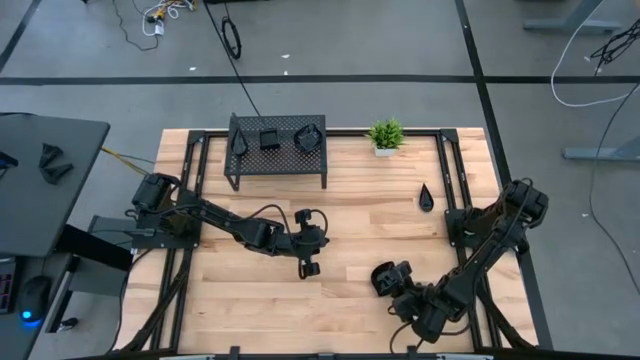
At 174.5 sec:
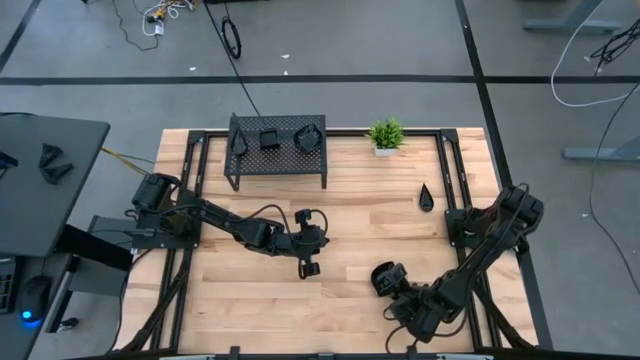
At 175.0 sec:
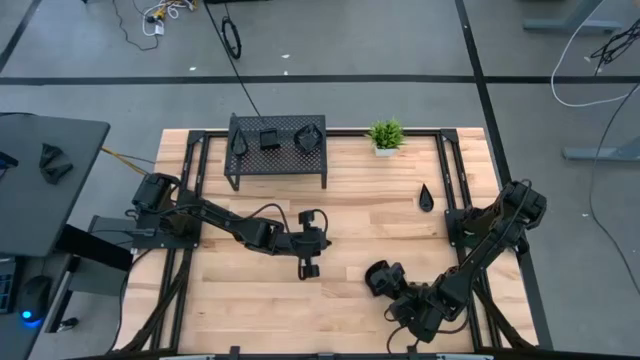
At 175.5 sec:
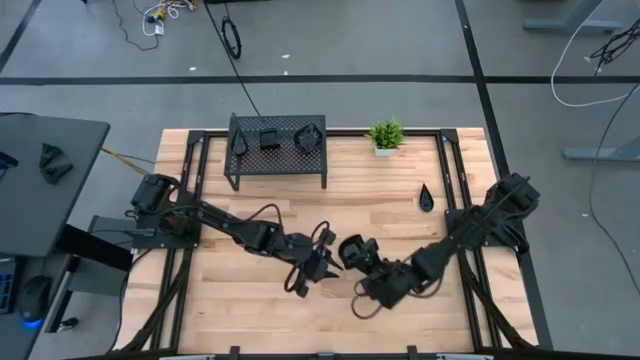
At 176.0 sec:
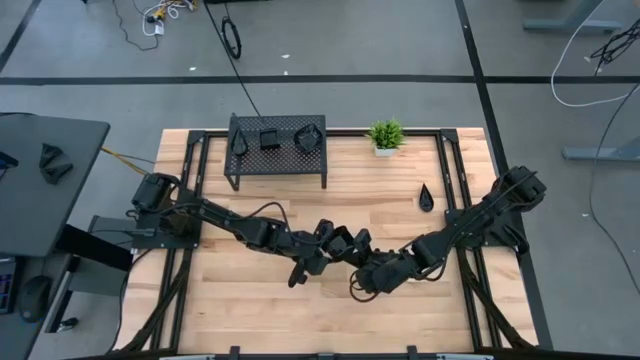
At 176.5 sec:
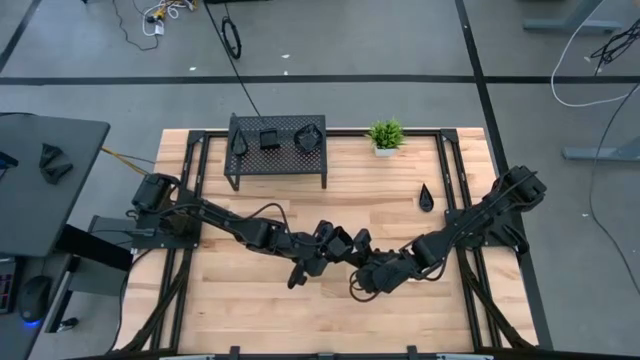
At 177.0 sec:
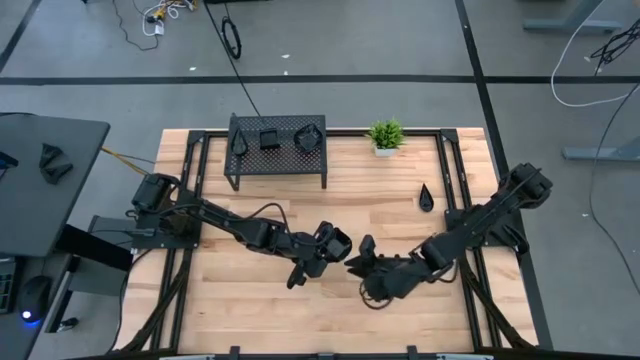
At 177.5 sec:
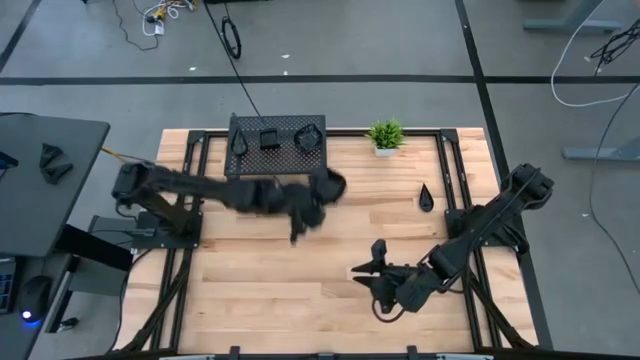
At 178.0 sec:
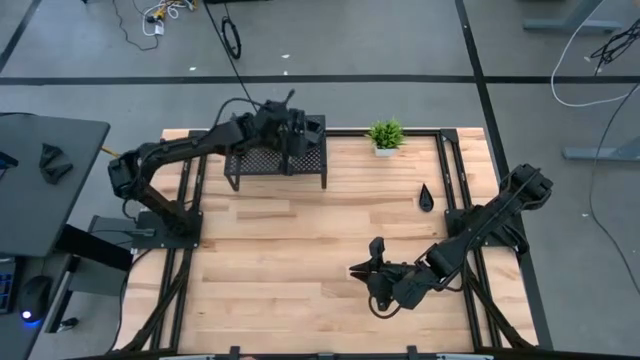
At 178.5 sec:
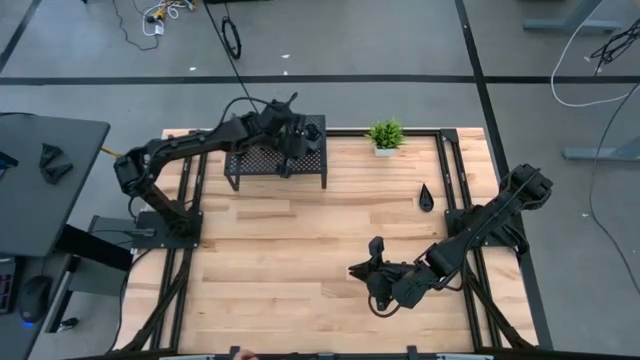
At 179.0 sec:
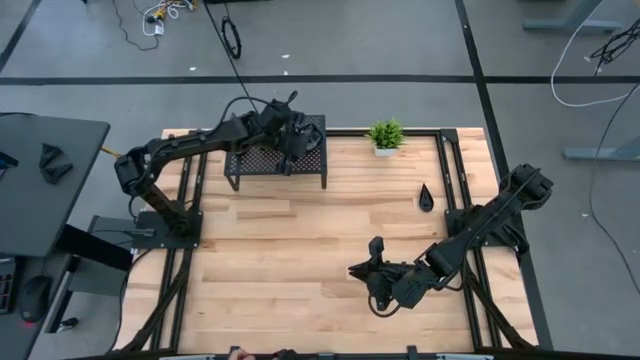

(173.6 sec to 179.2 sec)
Task: Pick & Place Mini shaped plates
Stack the black leaf shaped plate on top of the black leaf shaped plates on the shelf

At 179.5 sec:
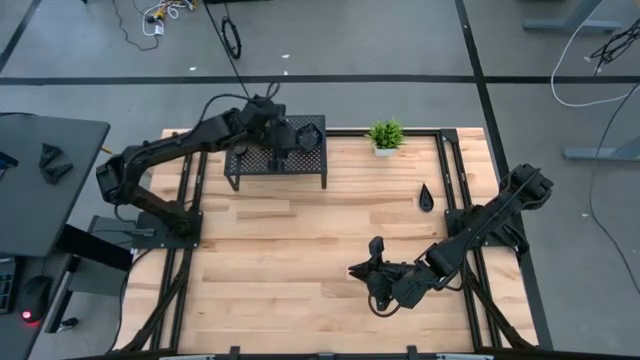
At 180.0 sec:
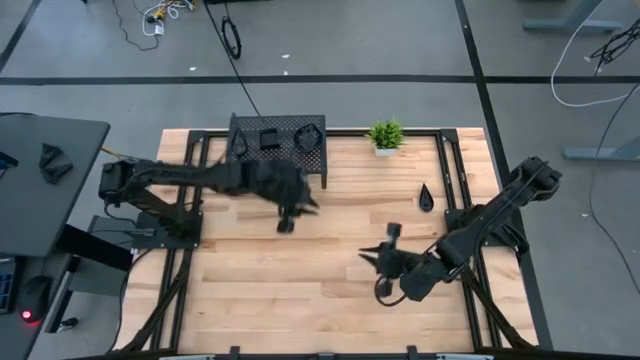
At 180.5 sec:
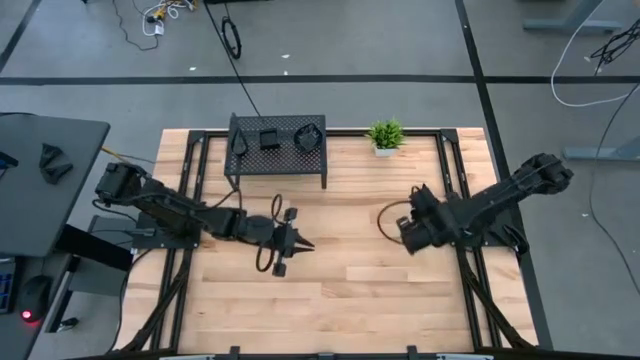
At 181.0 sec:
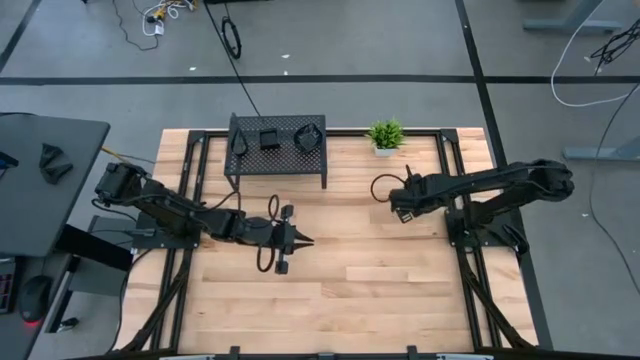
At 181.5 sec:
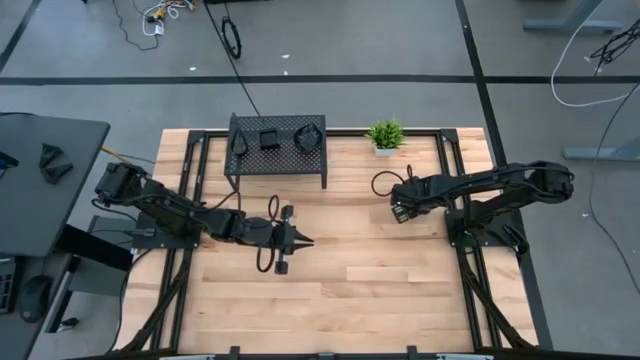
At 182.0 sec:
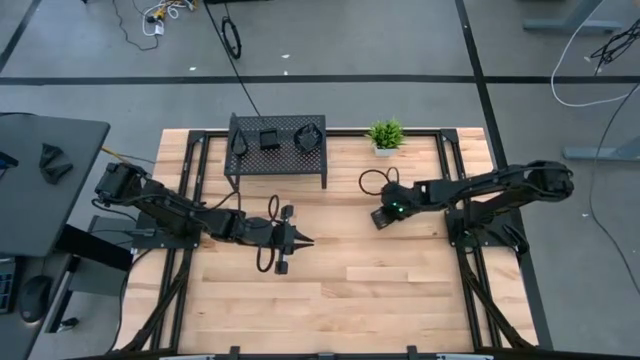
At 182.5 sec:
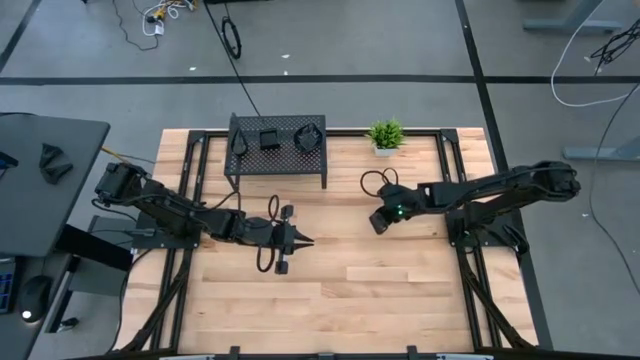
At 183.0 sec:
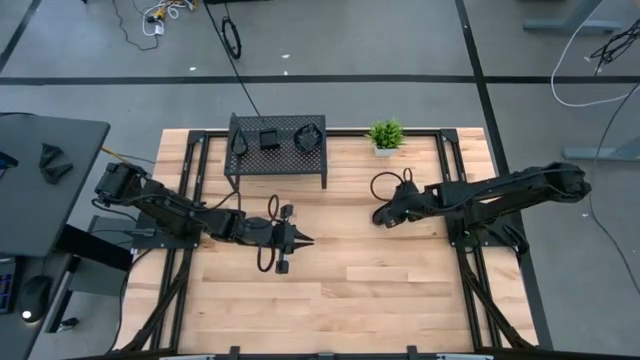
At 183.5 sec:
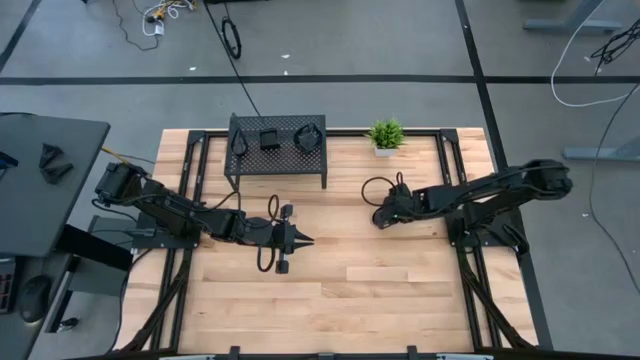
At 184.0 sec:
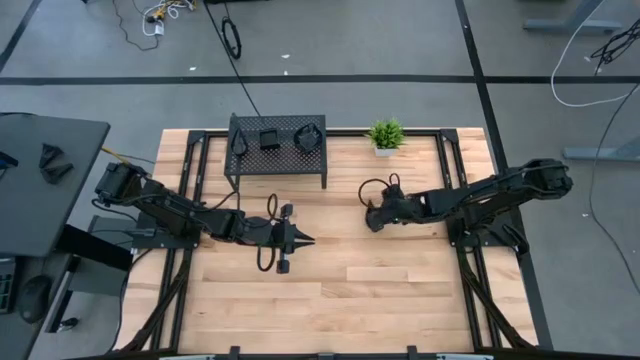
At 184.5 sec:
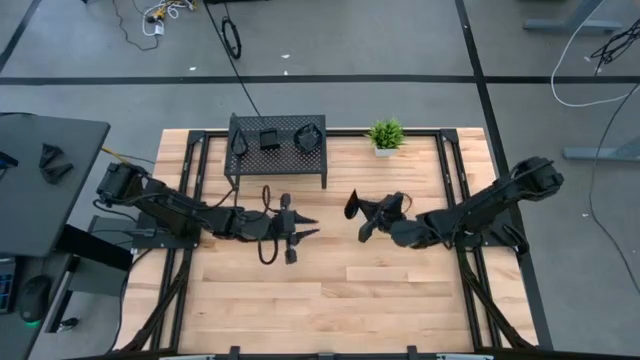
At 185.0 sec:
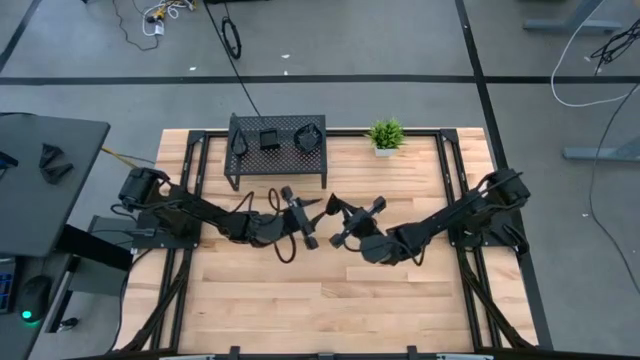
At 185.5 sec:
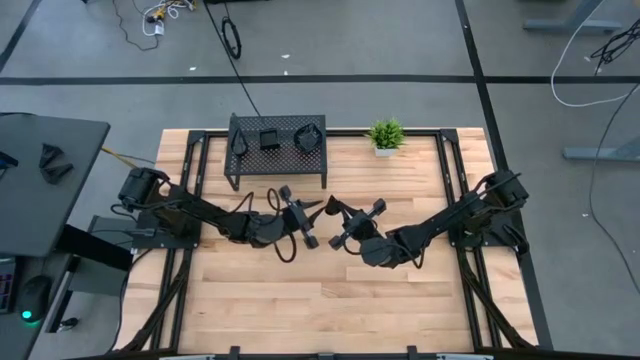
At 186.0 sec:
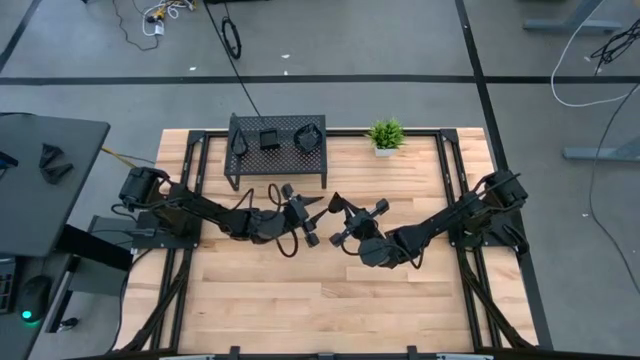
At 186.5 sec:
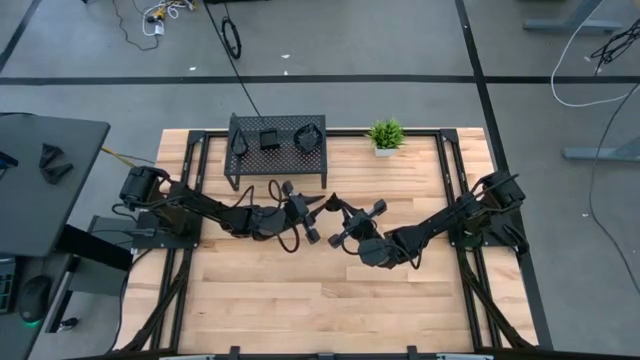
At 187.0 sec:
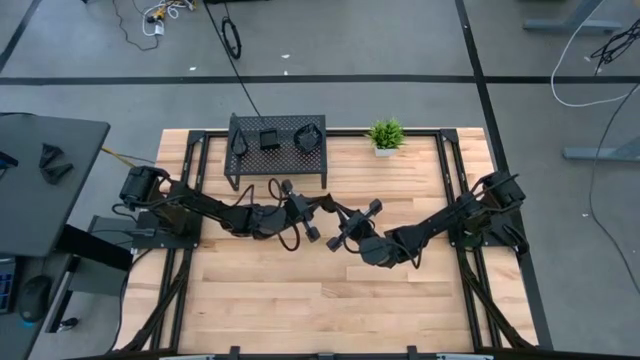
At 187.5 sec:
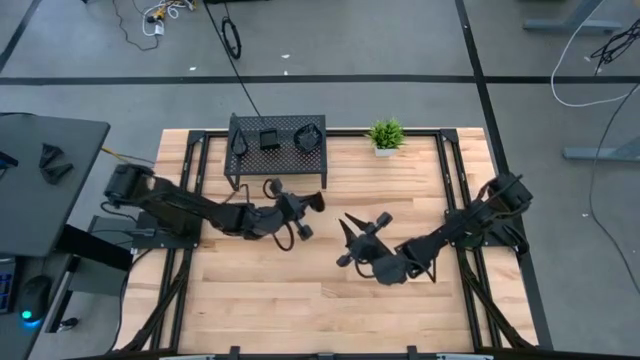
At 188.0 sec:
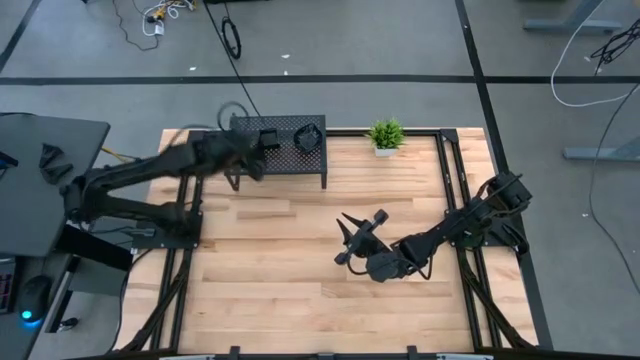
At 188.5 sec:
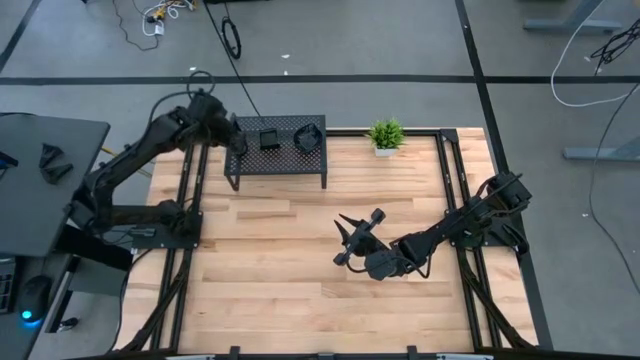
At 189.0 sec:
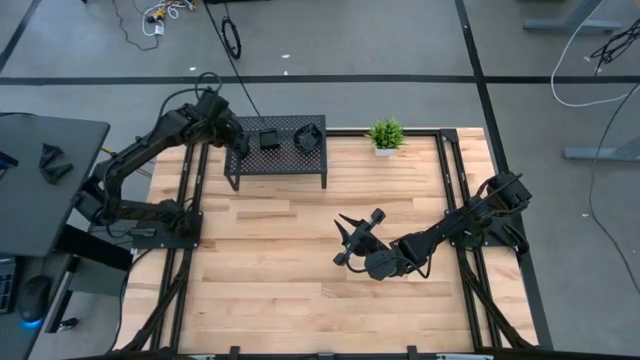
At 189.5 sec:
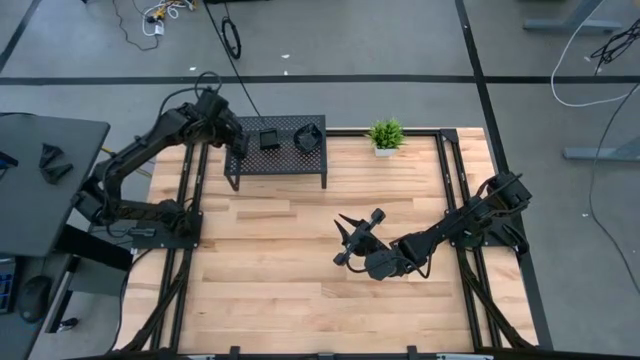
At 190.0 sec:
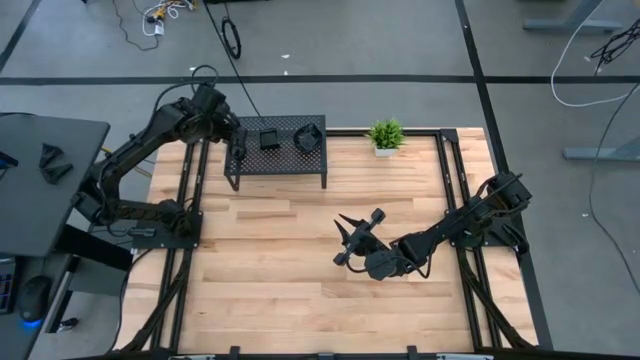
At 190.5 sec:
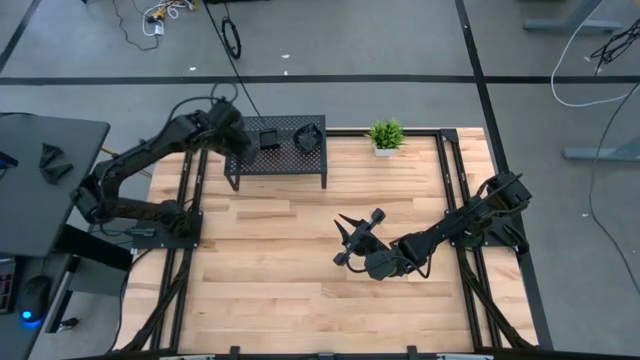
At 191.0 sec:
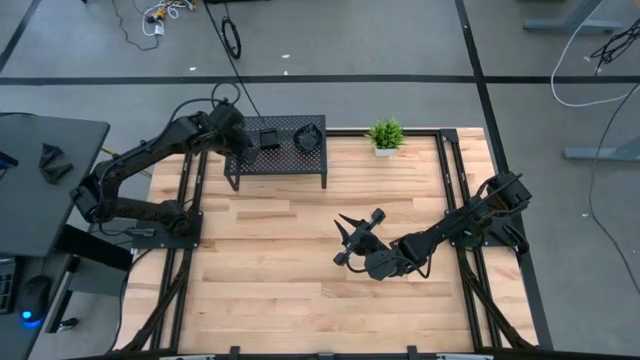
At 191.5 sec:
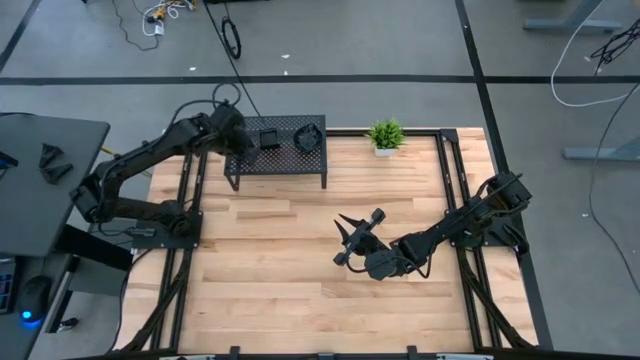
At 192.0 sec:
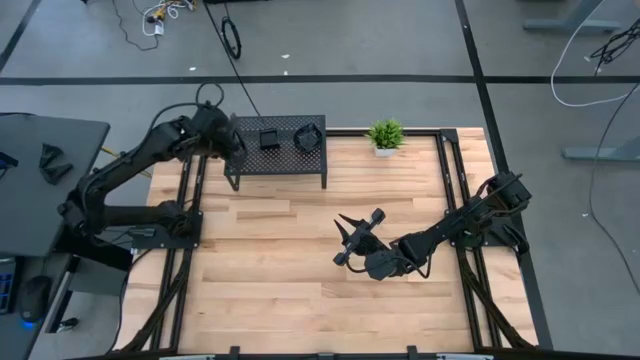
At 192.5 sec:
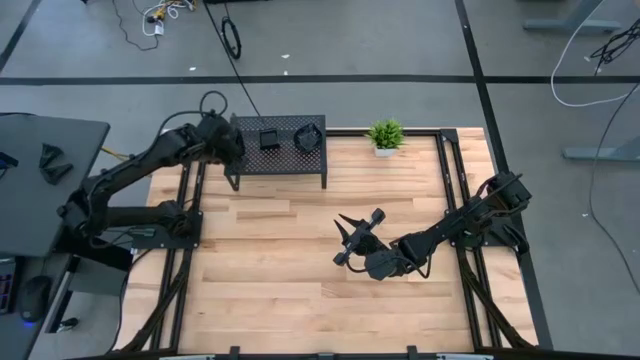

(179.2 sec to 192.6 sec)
Stack the black drop shaped plate on top of the black drop shaped plates on the shelf
